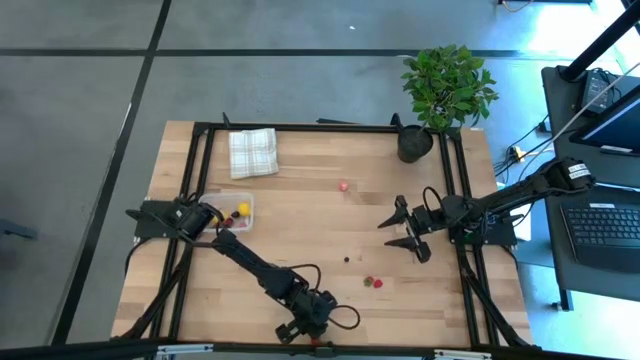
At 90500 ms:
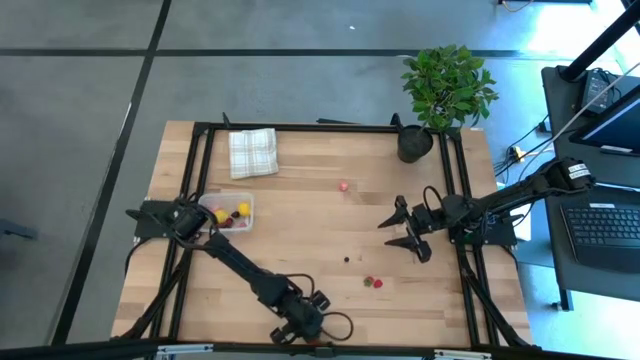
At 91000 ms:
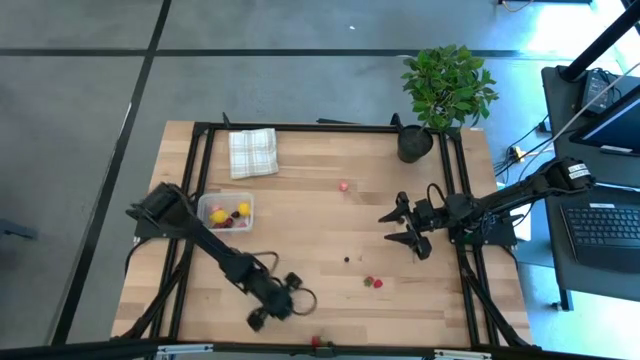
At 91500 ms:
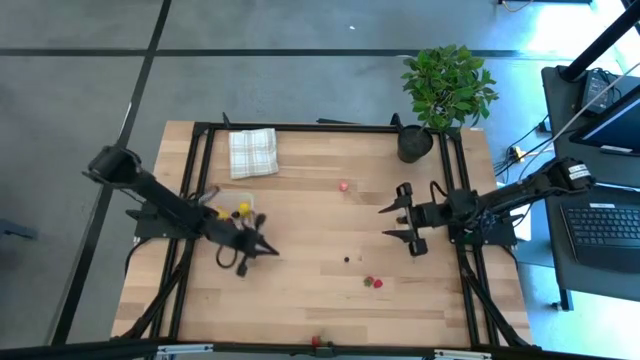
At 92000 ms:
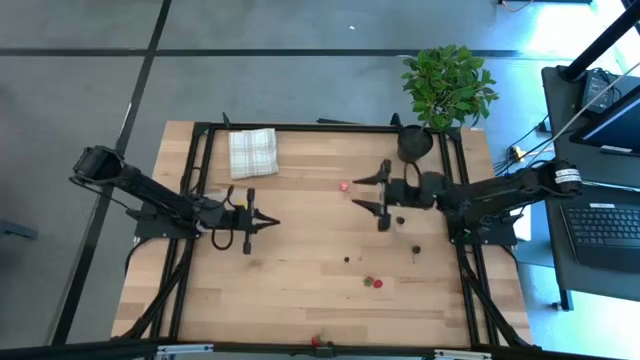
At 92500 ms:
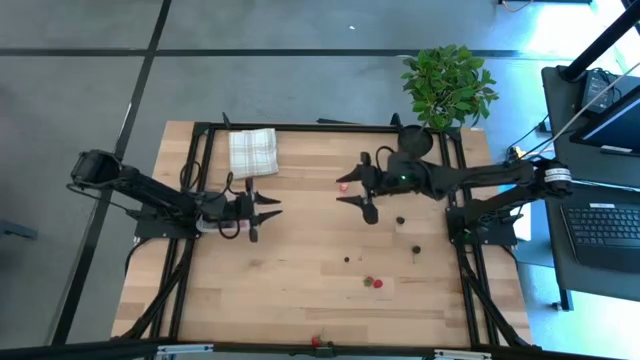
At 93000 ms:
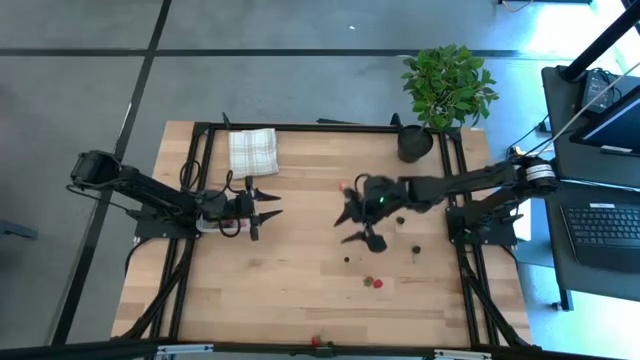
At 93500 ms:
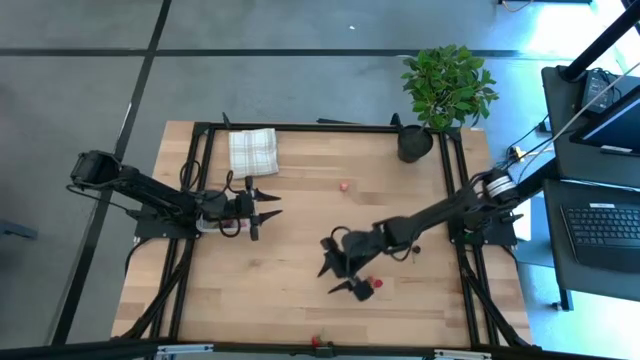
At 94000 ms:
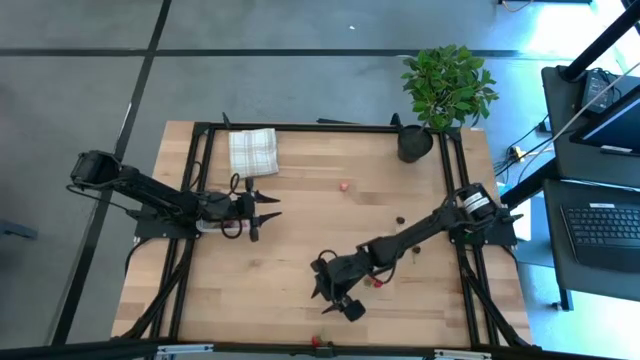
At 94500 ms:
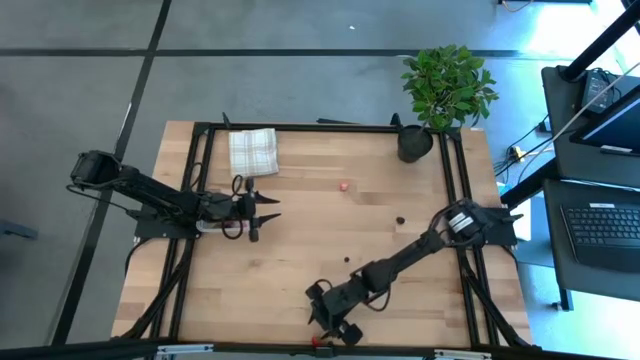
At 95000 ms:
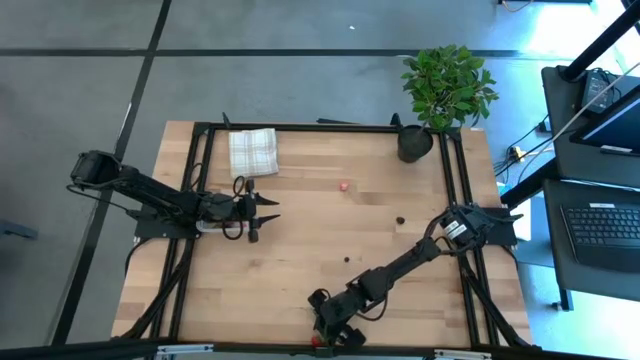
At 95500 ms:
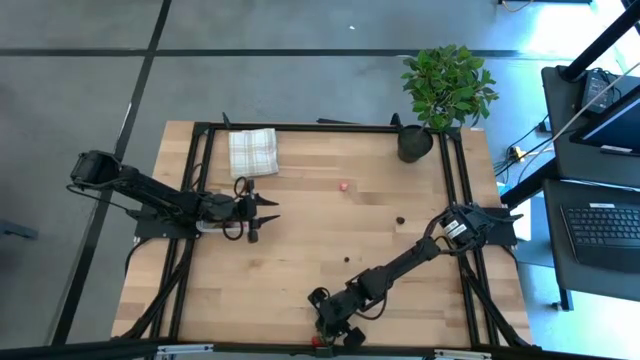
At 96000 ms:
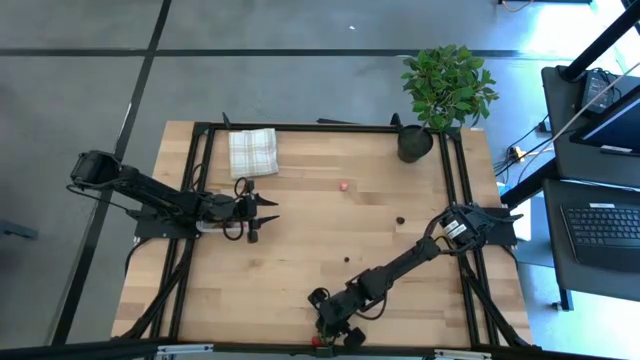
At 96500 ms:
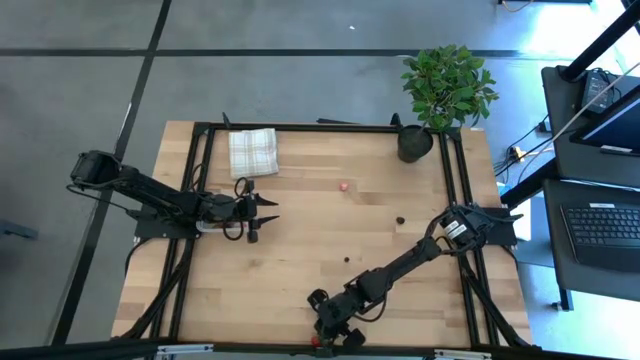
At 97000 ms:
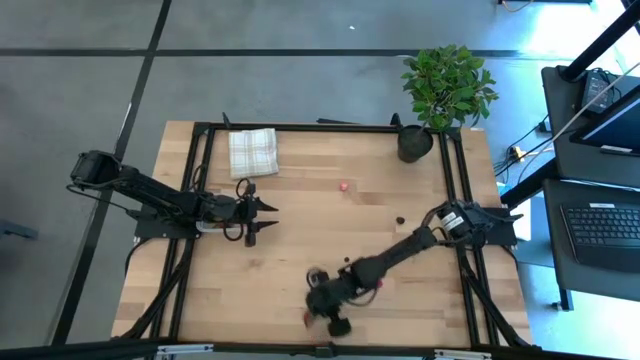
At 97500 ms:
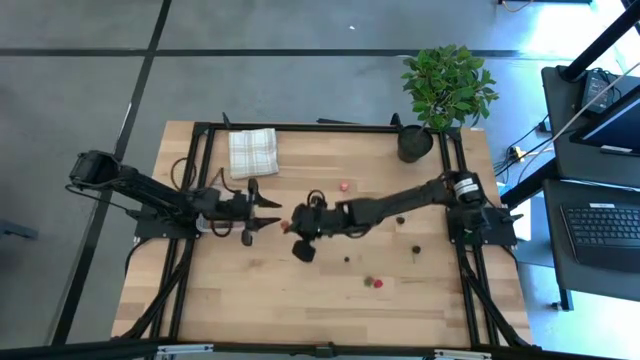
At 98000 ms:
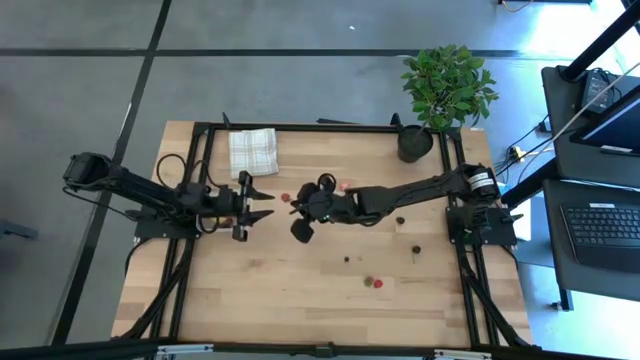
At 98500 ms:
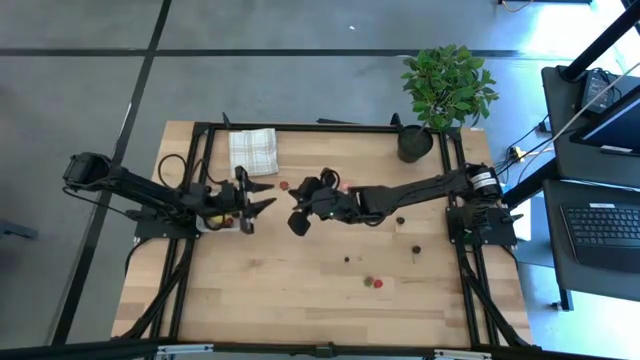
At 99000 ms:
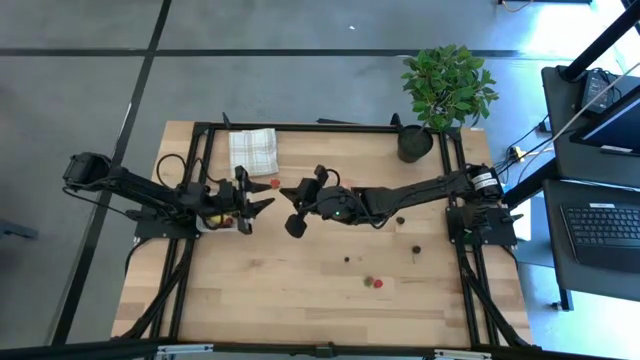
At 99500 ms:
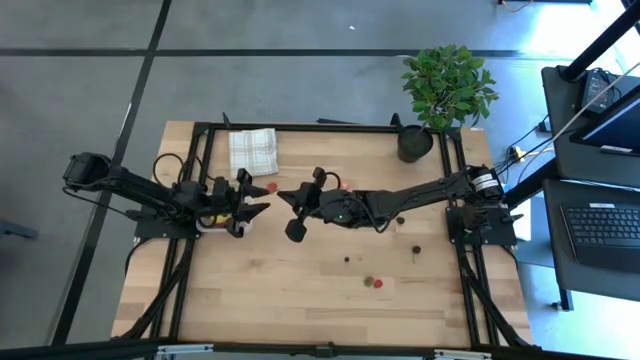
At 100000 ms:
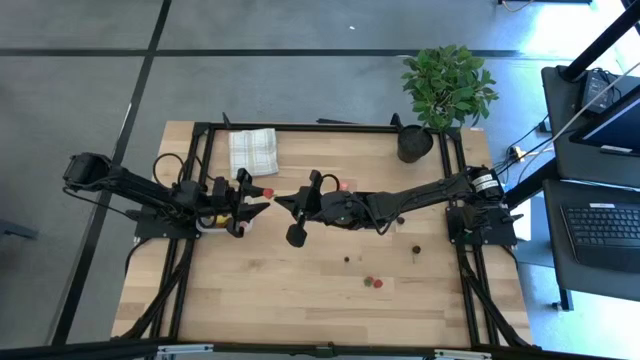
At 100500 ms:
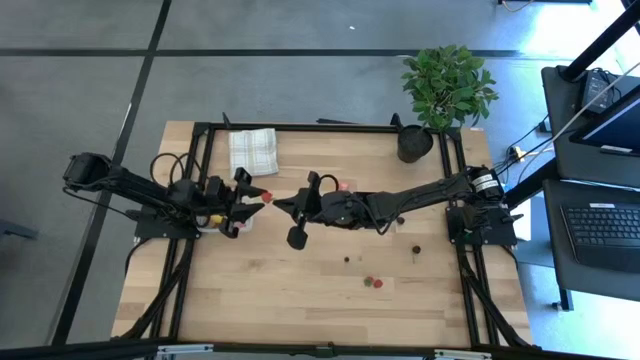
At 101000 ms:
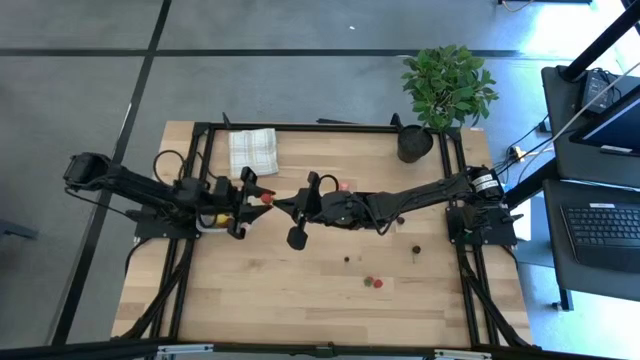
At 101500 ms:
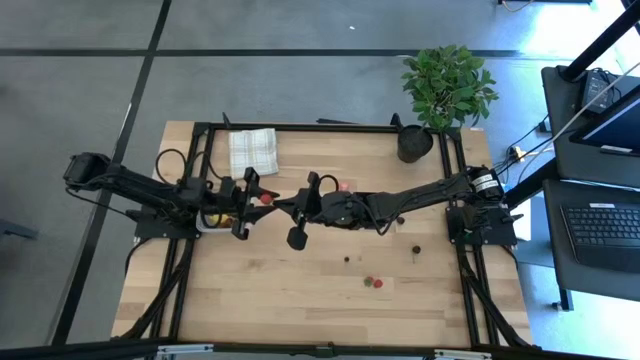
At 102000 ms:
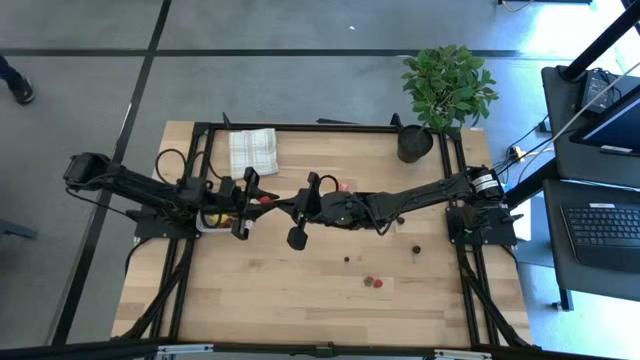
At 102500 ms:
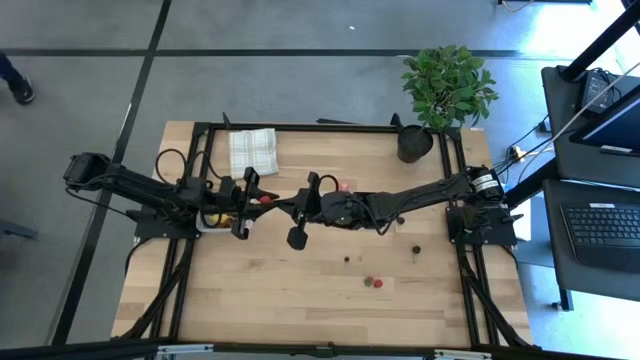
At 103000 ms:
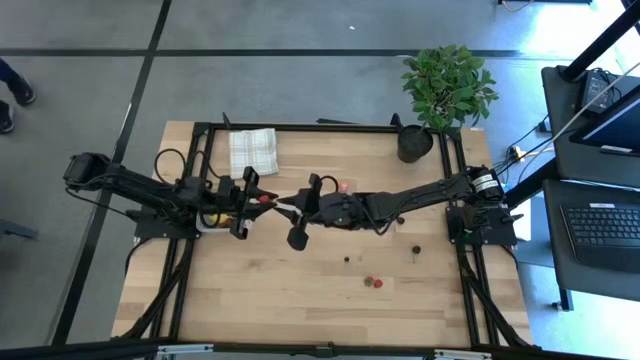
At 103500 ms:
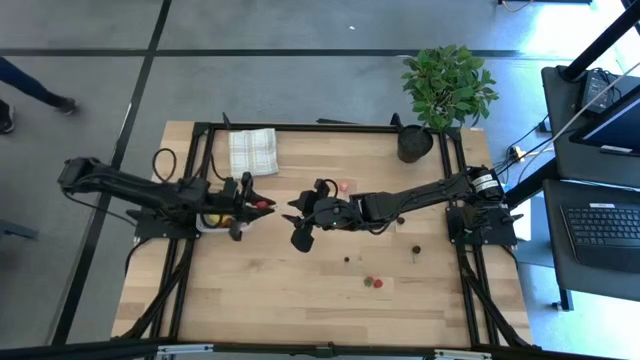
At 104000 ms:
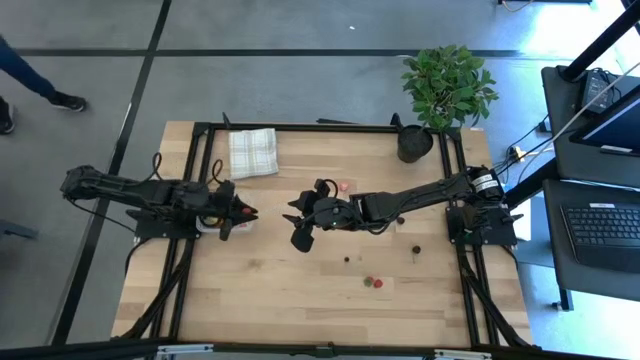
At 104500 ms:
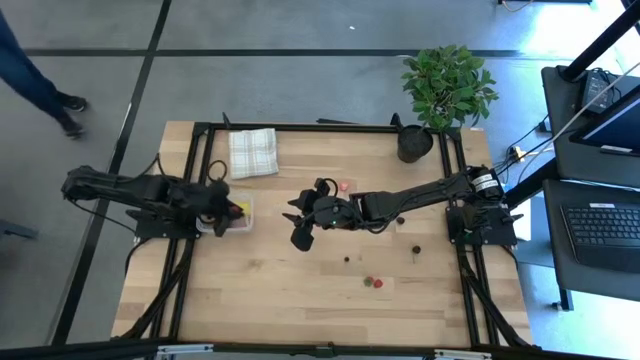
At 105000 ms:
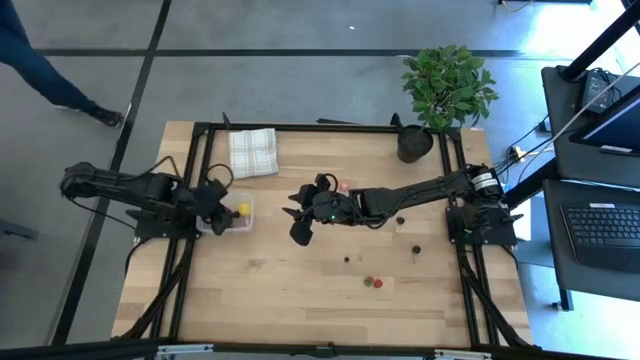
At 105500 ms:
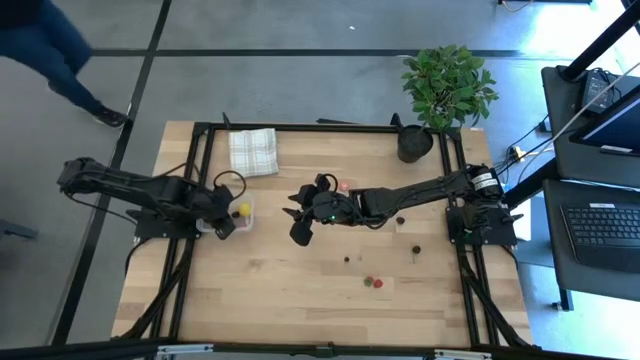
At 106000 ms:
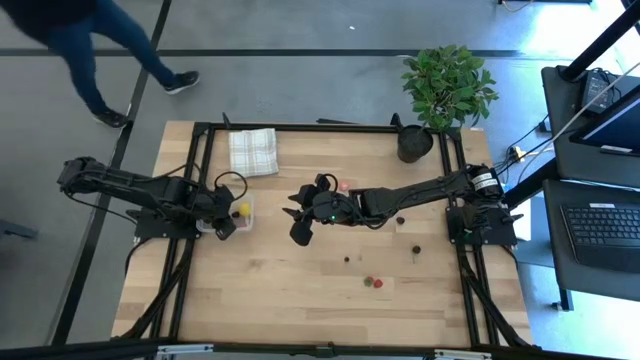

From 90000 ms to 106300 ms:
Task: Pick and placing Produce into tupperware
Put the bottom red strawberry into the transparent bin

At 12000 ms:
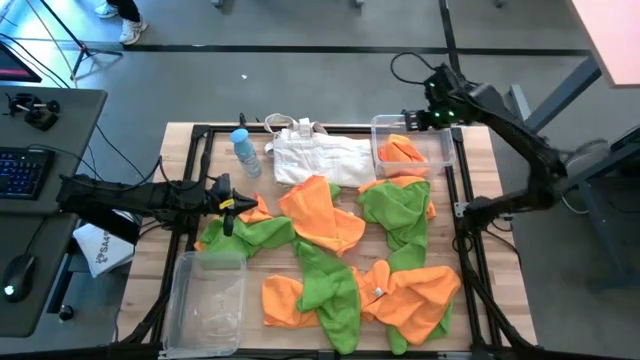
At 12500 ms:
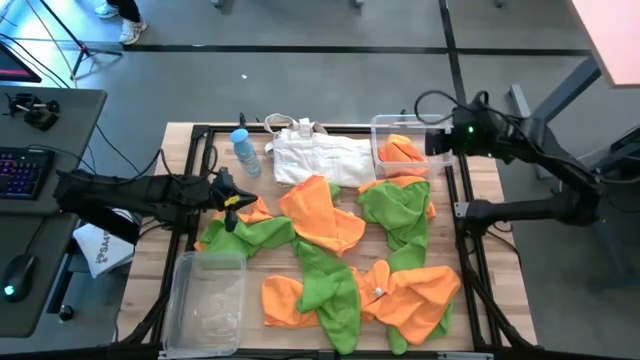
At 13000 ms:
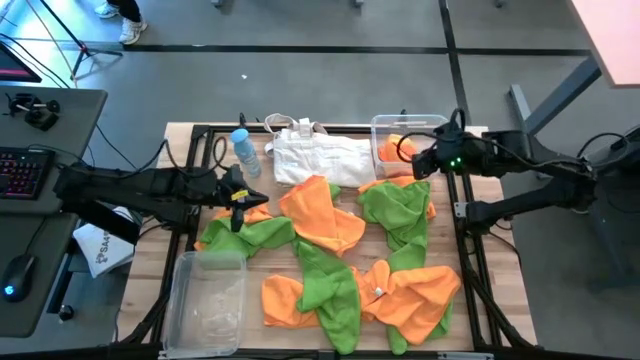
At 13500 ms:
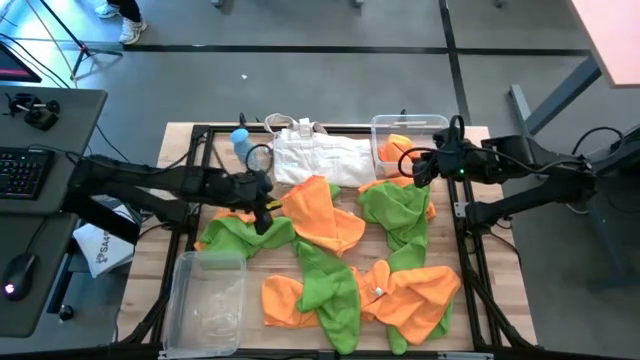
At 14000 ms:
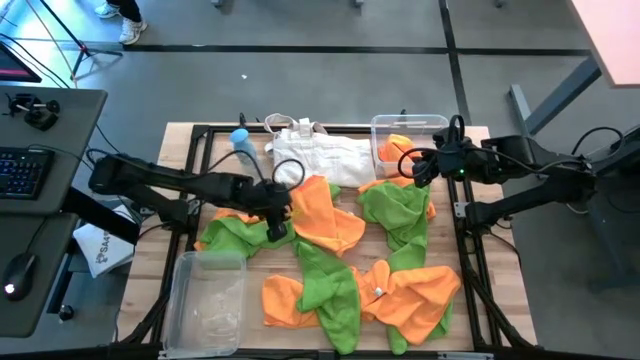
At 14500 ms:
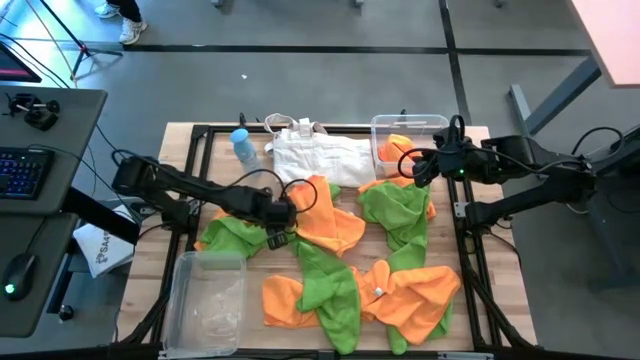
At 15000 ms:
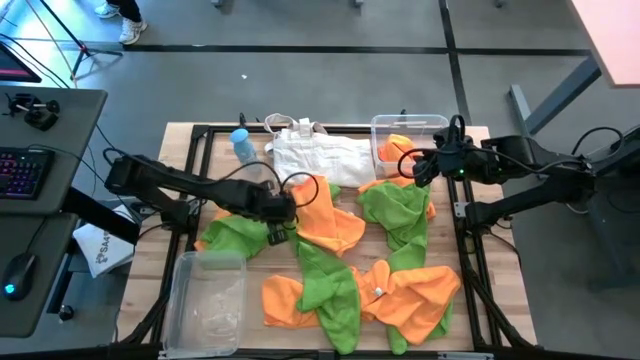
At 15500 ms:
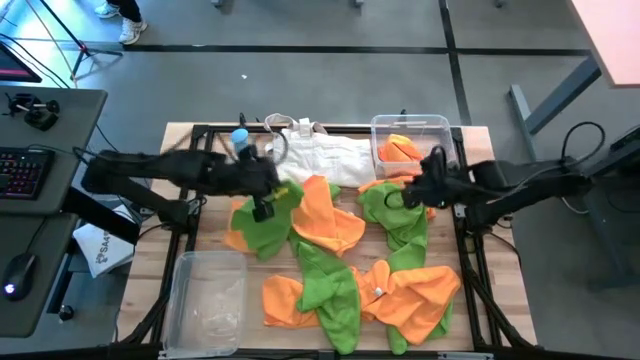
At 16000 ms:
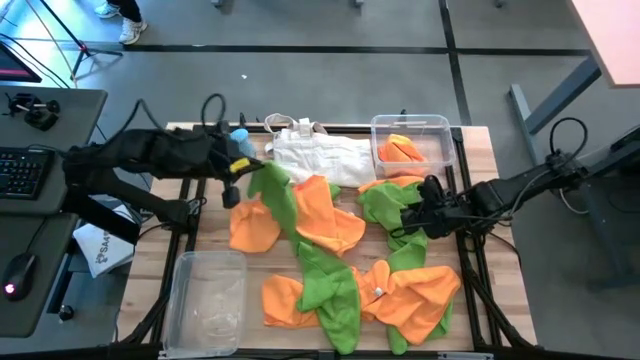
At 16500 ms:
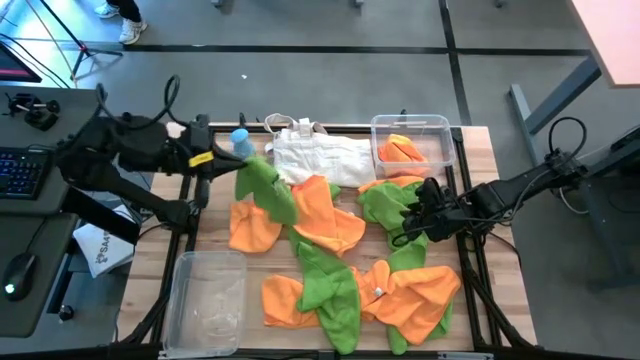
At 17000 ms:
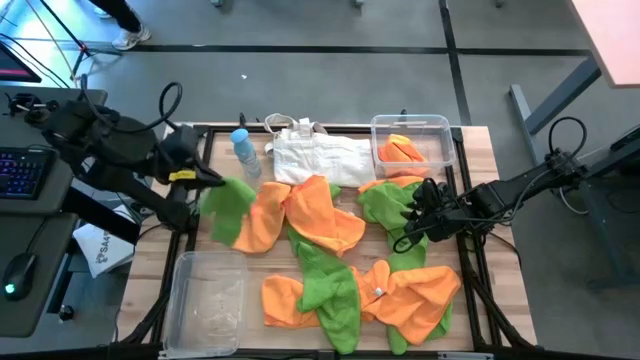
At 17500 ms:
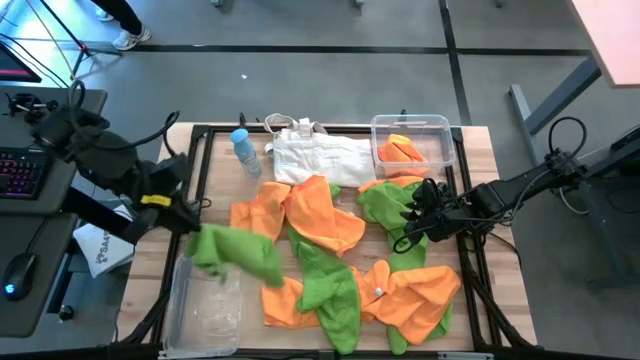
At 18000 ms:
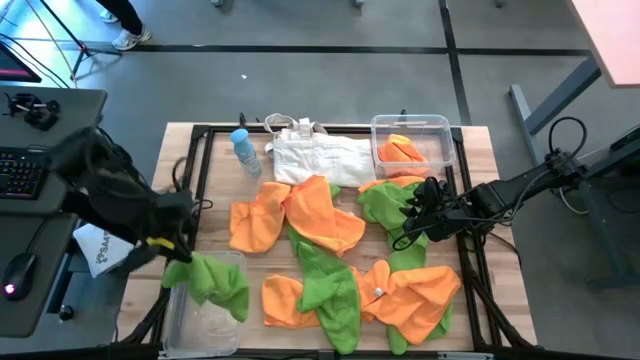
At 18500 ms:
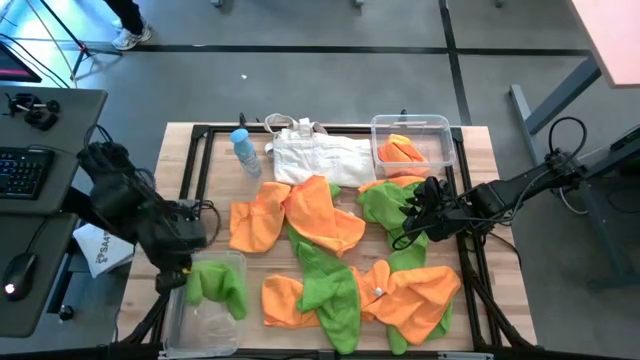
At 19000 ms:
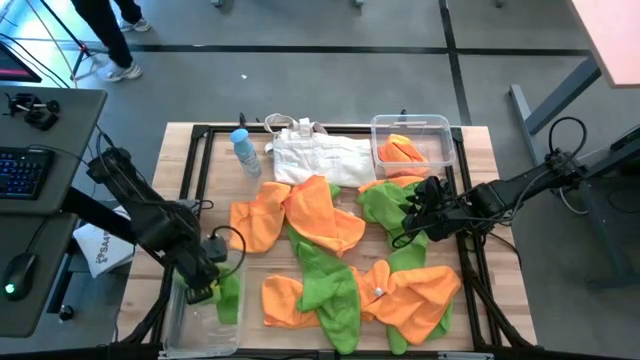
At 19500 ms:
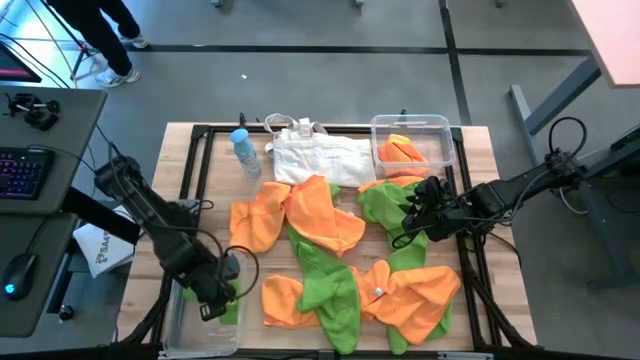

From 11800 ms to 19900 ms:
Task: Sort microfiber towel by color & place in baskets
Put the green microfiber cloth into the bottom transparent bin
